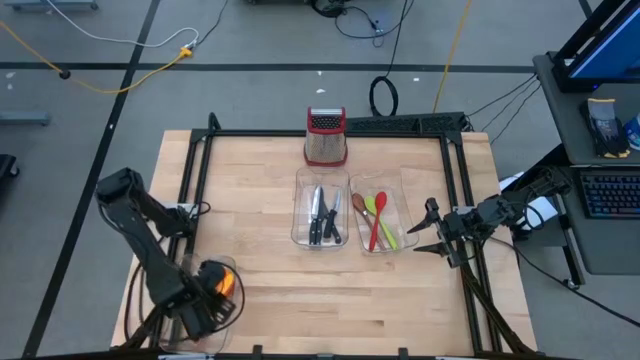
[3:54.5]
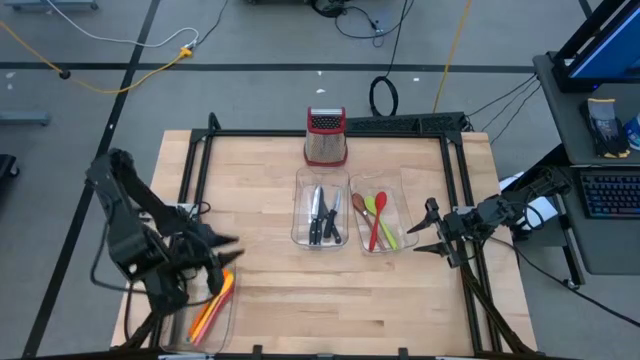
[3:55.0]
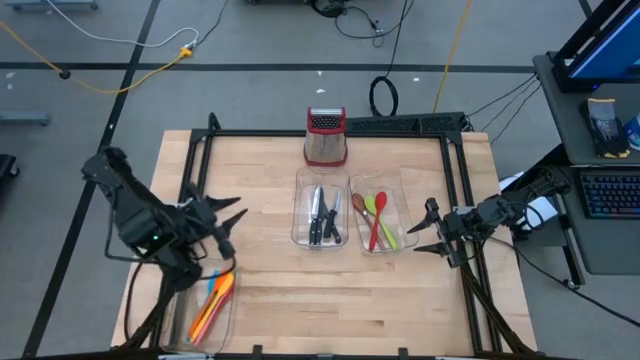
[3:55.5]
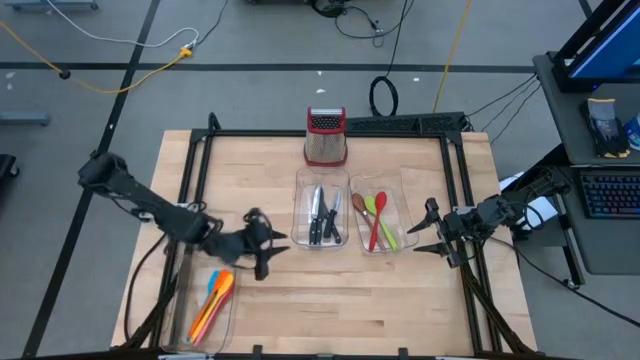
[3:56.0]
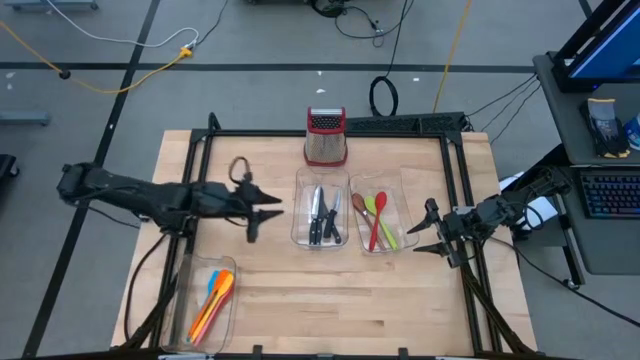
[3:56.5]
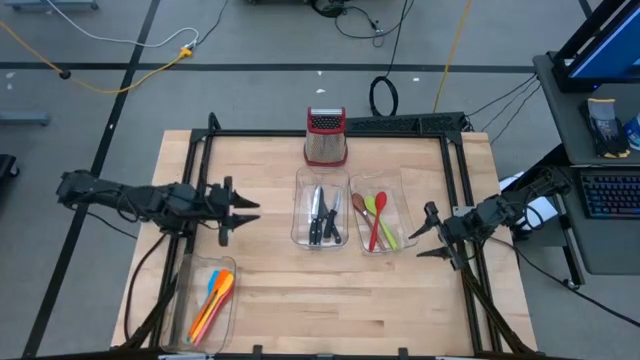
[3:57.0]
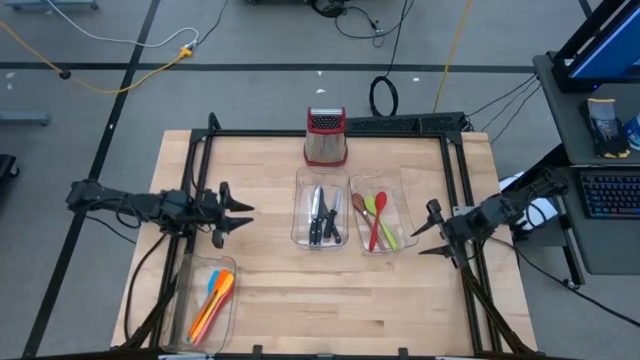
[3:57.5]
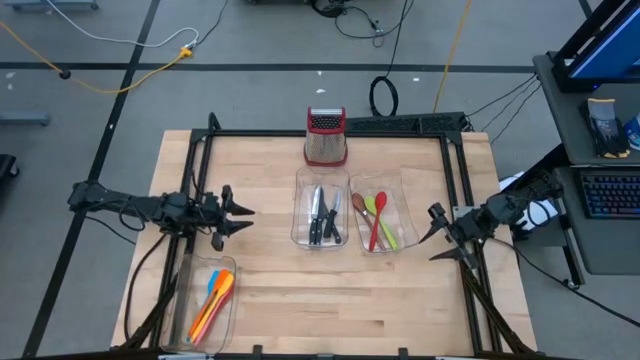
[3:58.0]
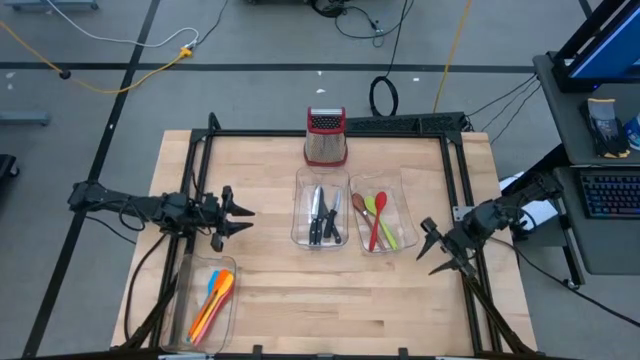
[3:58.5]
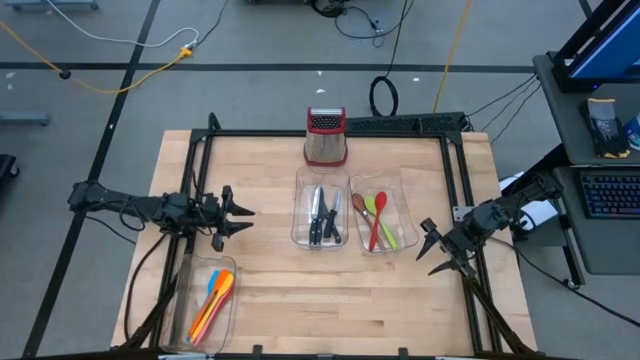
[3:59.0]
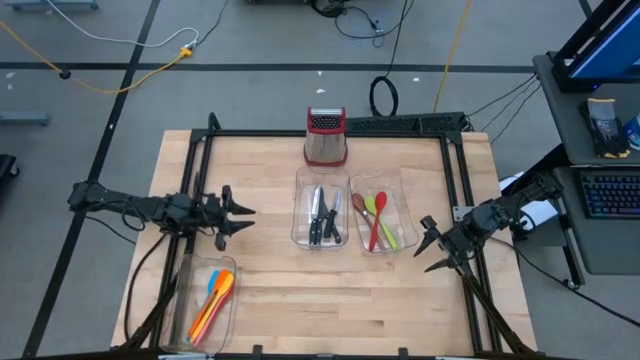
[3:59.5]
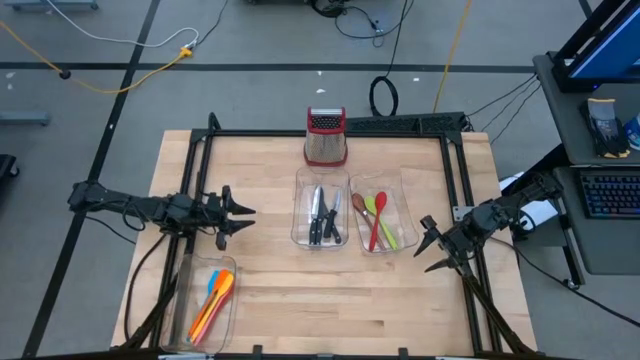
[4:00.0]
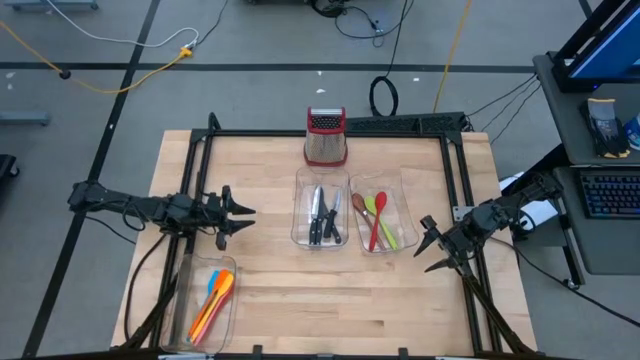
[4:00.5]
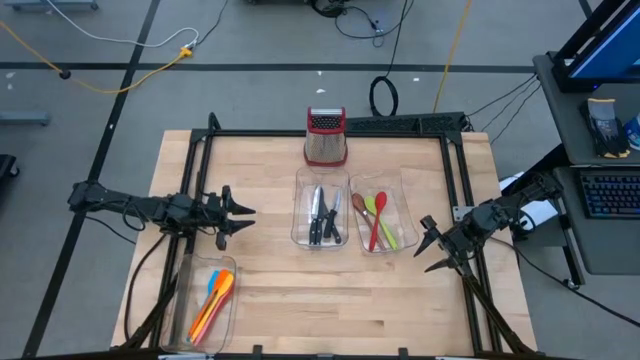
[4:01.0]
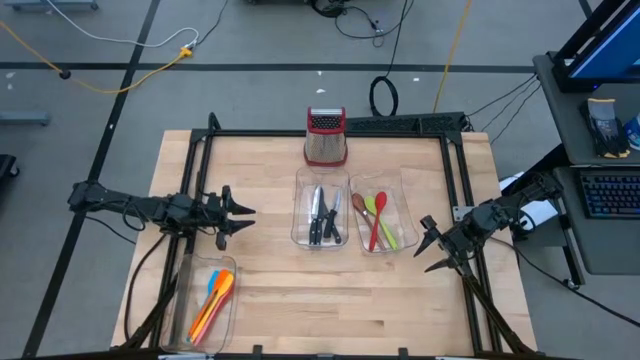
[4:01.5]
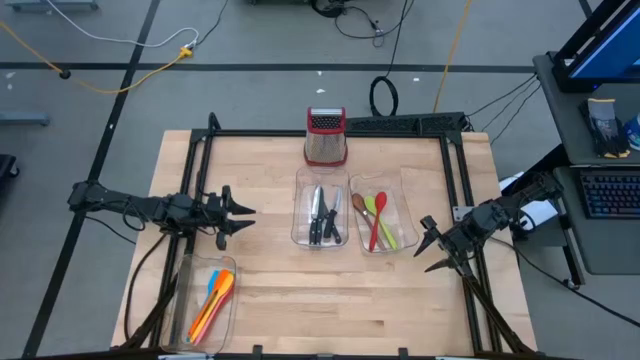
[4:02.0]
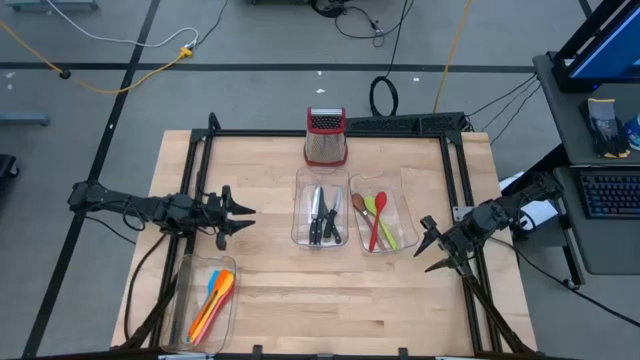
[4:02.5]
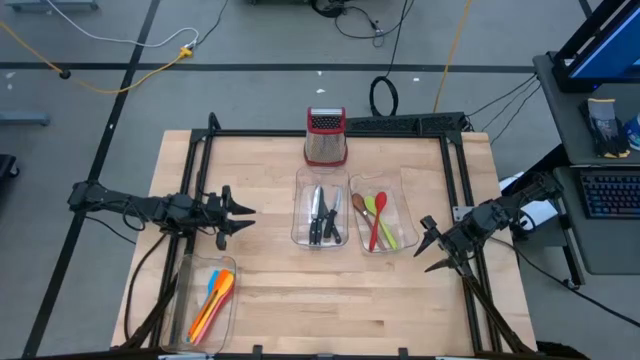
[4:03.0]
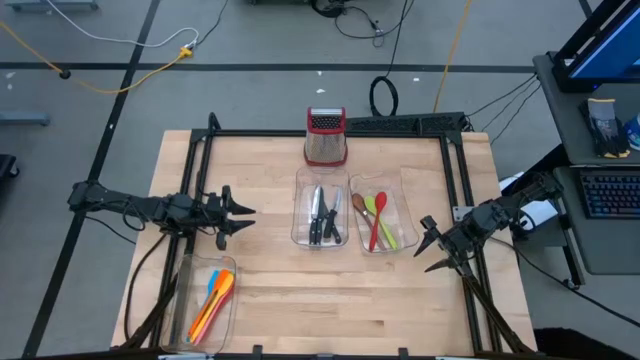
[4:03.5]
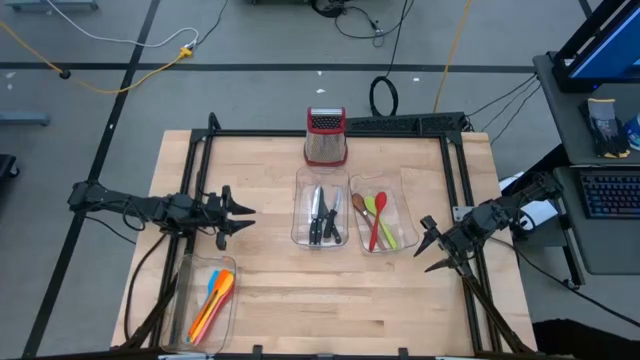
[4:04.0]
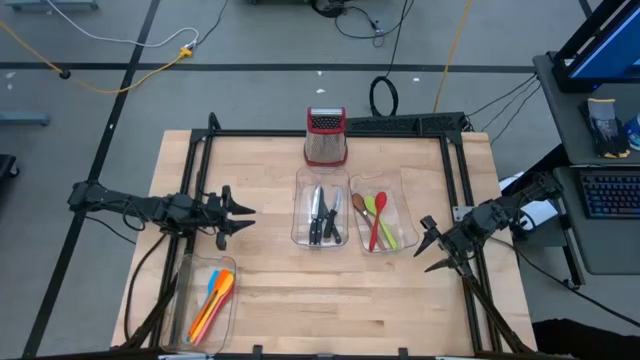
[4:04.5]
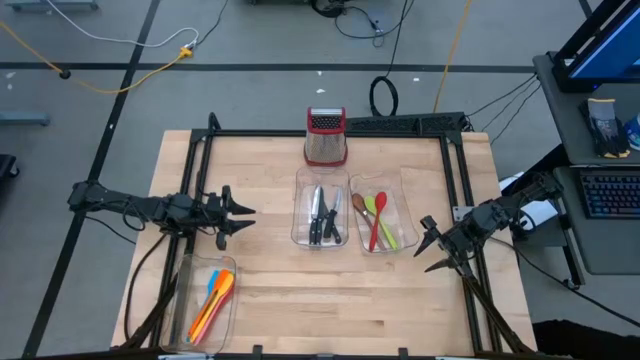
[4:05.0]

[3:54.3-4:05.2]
Task: Pick & Place Kitchen Items
Return to Home Position

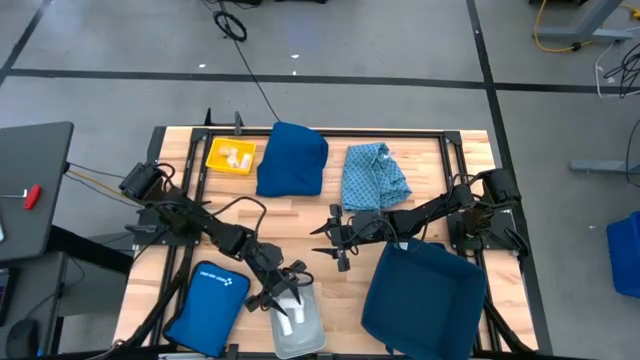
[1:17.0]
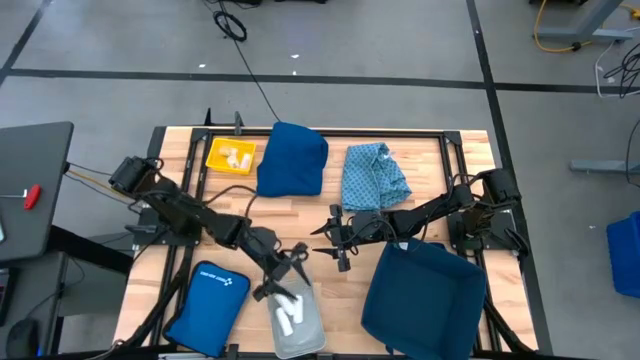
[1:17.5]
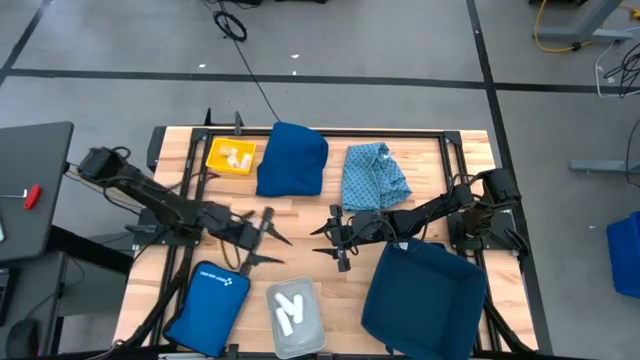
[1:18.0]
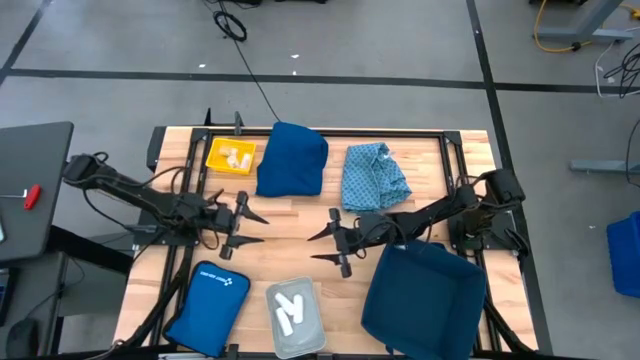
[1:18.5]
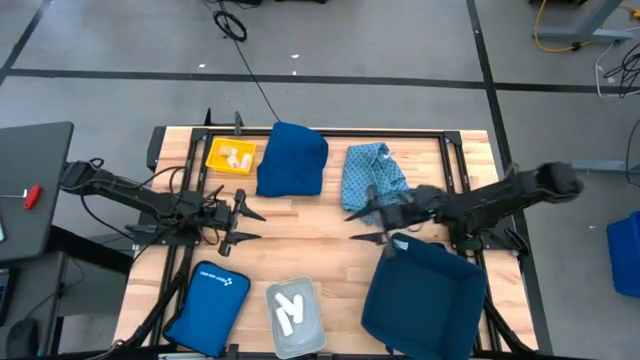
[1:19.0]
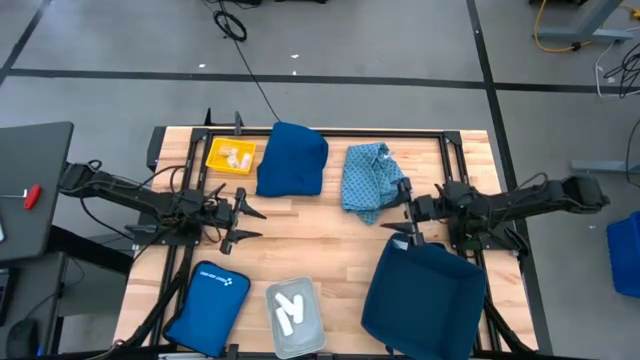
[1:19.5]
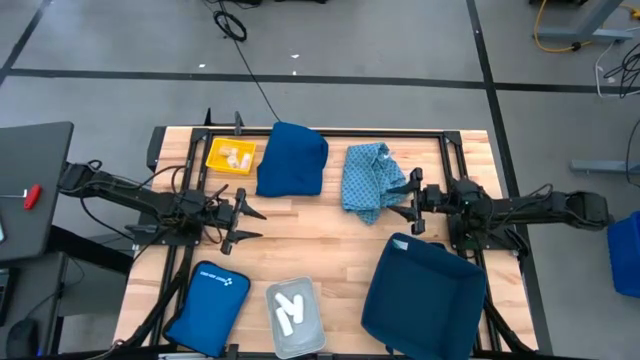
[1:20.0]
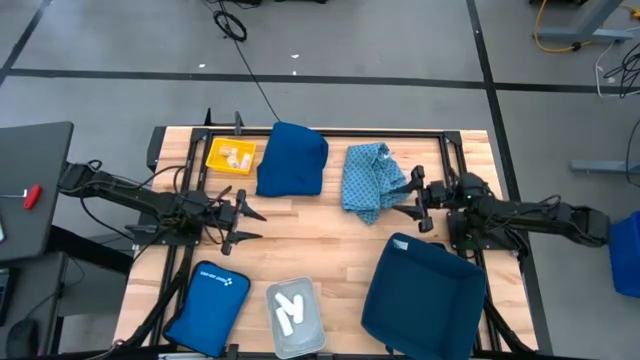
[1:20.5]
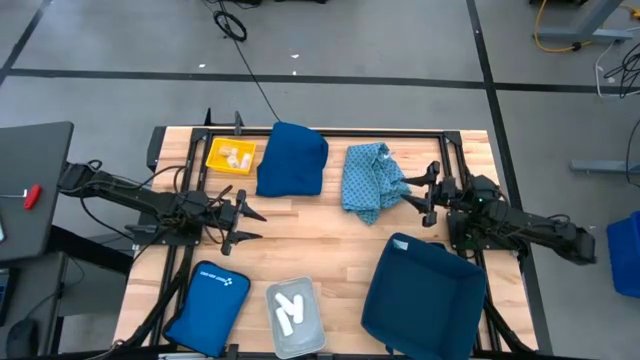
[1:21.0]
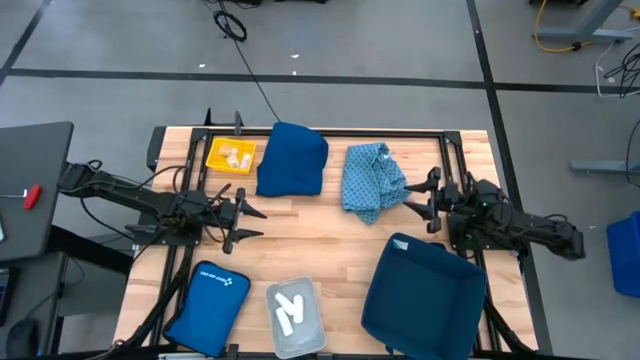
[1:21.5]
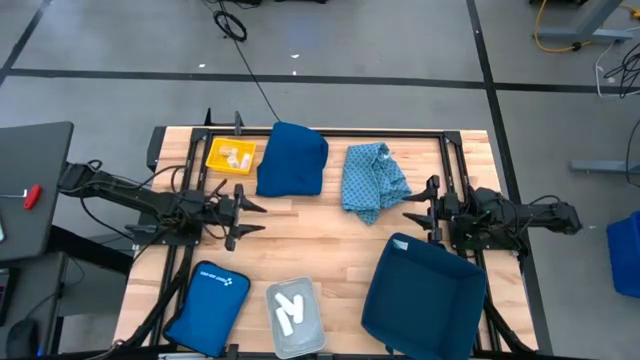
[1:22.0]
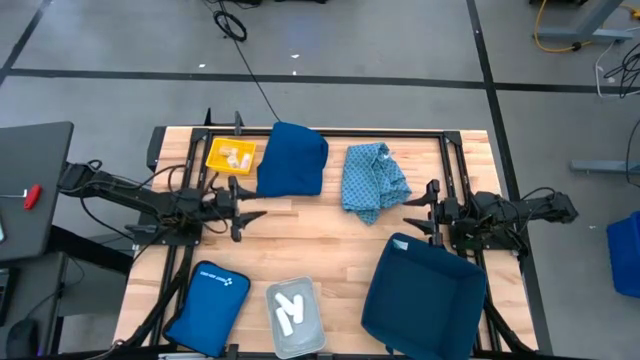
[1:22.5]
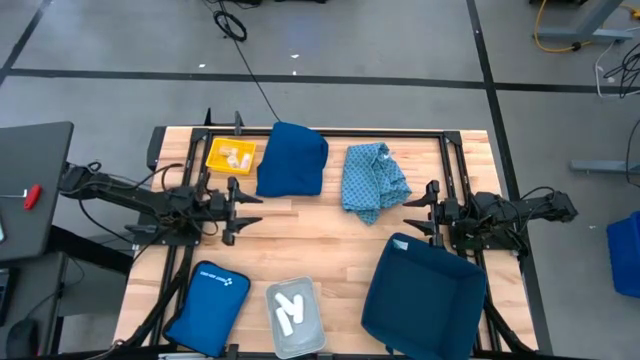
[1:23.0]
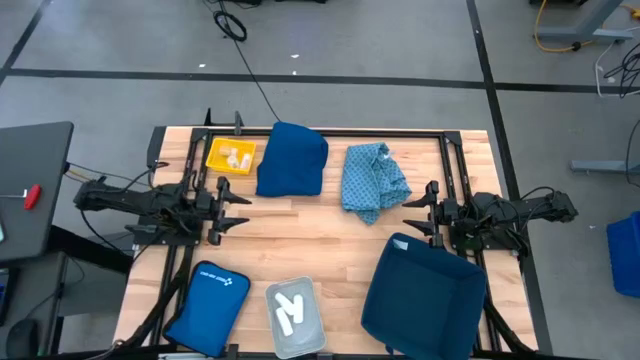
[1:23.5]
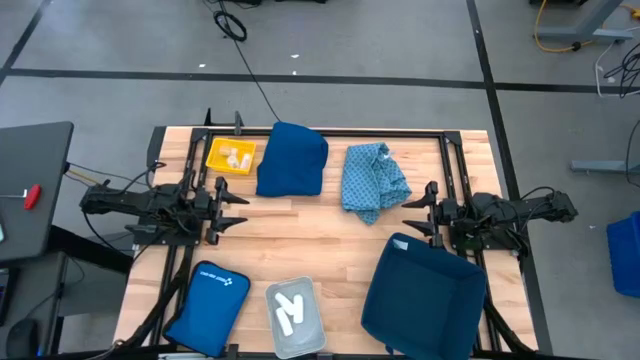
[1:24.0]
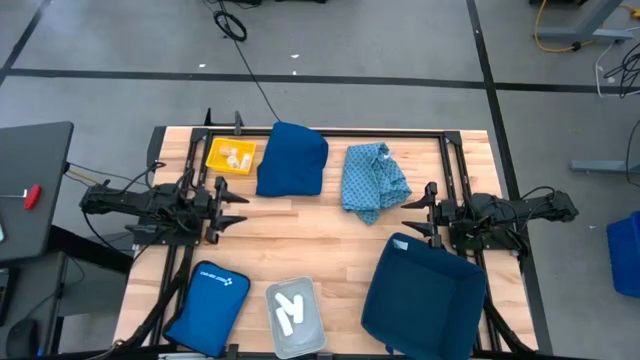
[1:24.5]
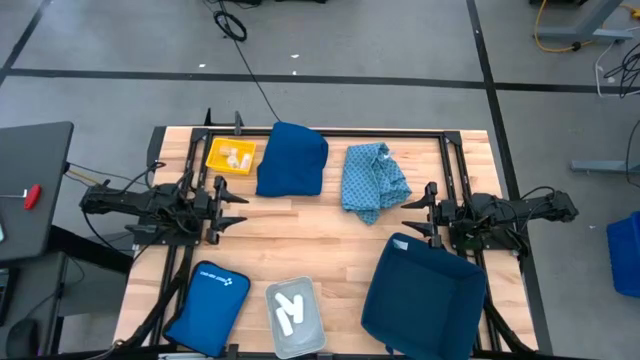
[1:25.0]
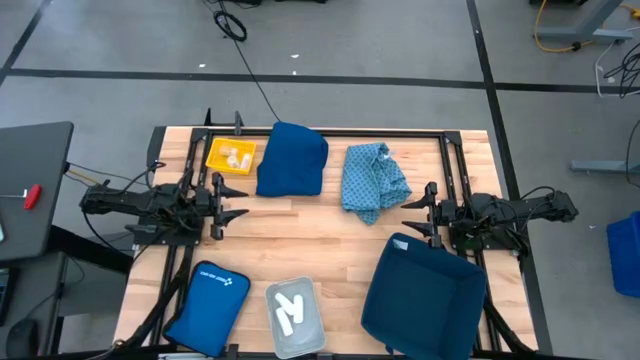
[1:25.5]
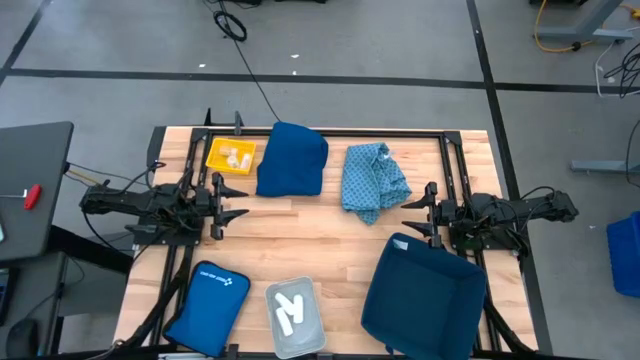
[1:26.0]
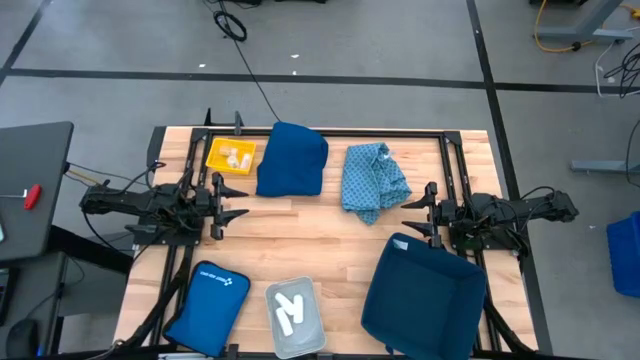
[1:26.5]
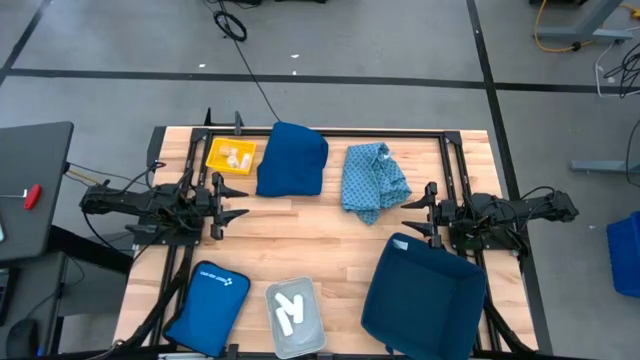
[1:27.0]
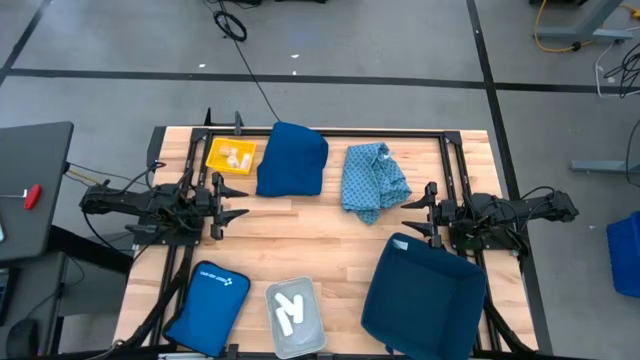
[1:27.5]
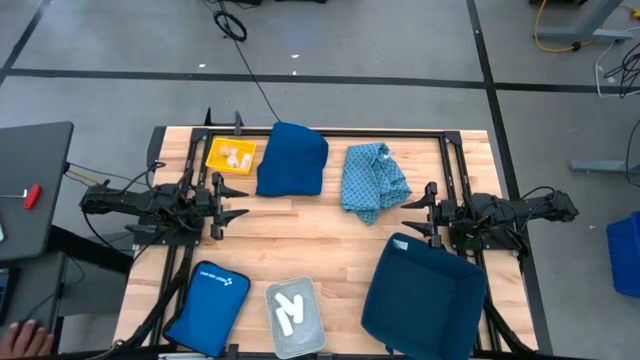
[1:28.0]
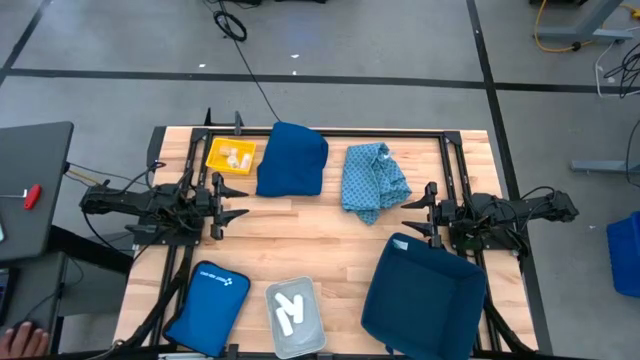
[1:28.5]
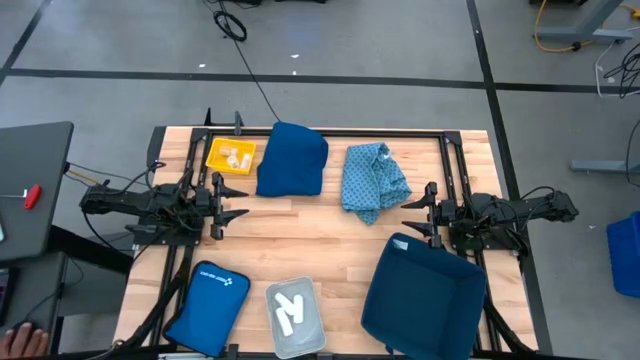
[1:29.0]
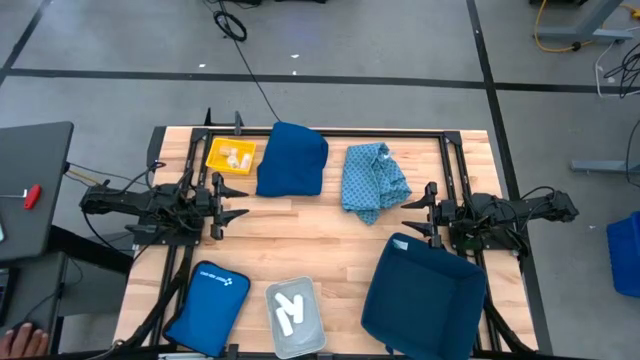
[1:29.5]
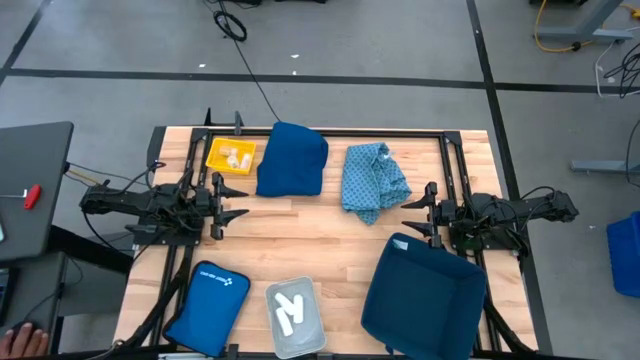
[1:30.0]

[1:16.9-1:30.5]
Task: Pick & place medical supplies in basket/bin
Return to Home Position
